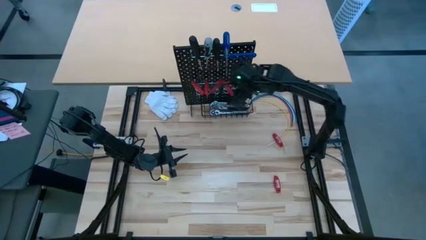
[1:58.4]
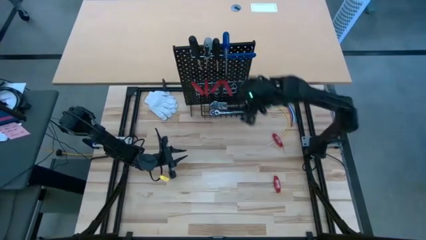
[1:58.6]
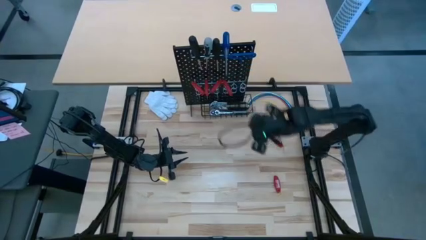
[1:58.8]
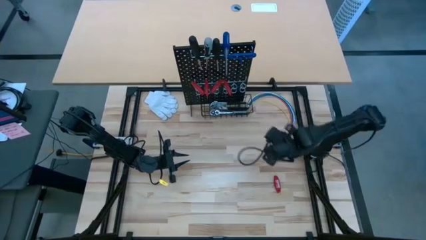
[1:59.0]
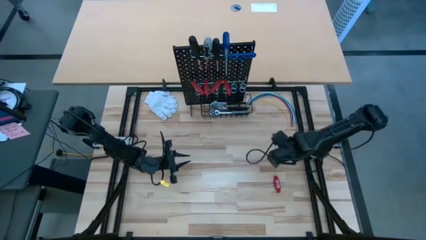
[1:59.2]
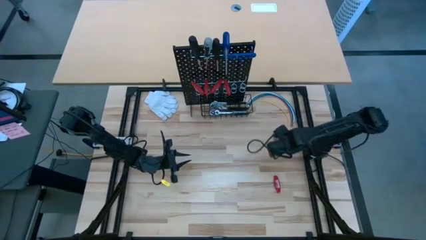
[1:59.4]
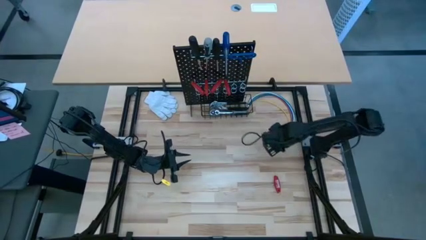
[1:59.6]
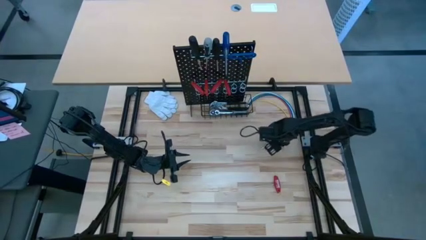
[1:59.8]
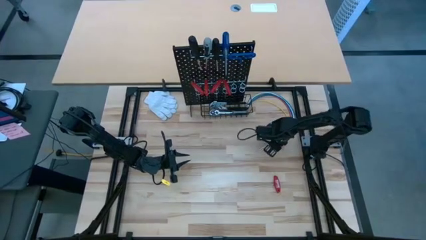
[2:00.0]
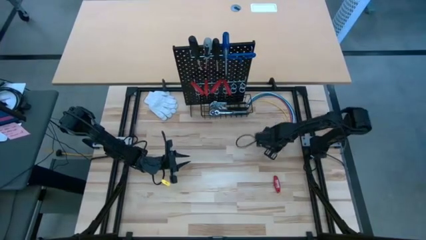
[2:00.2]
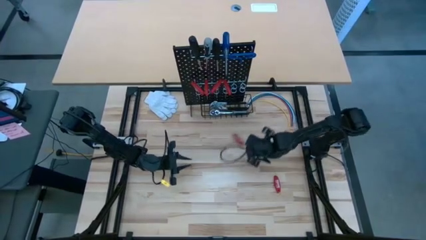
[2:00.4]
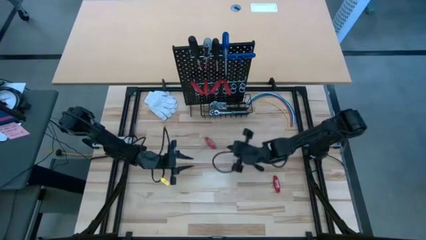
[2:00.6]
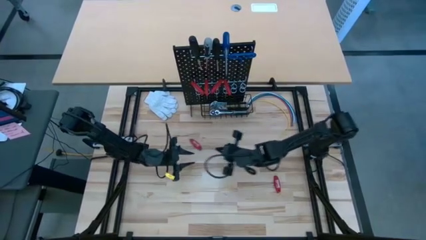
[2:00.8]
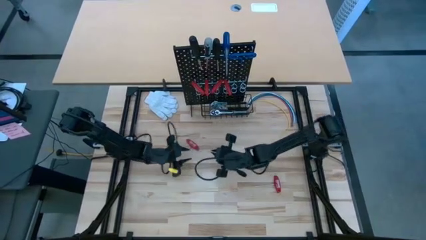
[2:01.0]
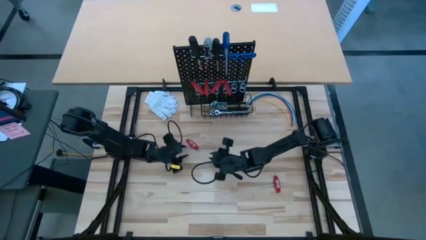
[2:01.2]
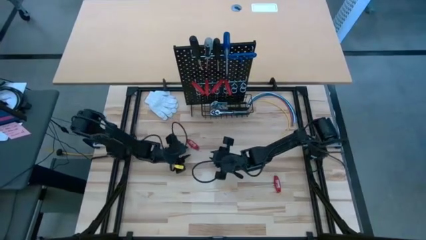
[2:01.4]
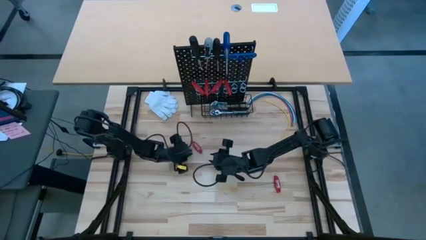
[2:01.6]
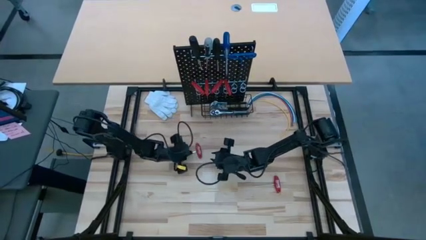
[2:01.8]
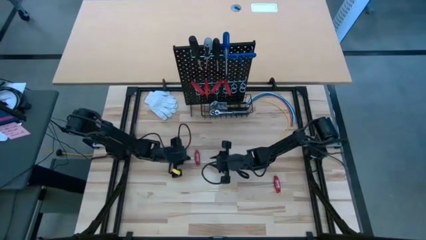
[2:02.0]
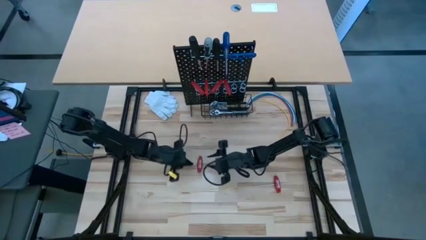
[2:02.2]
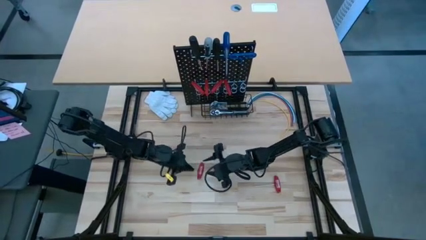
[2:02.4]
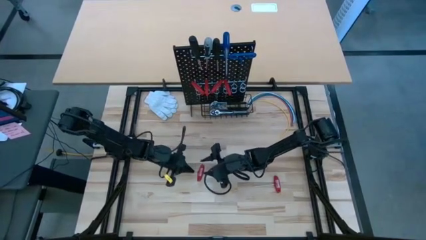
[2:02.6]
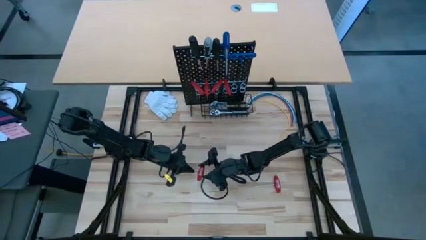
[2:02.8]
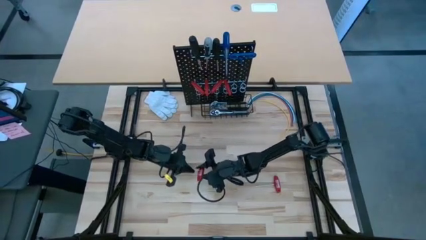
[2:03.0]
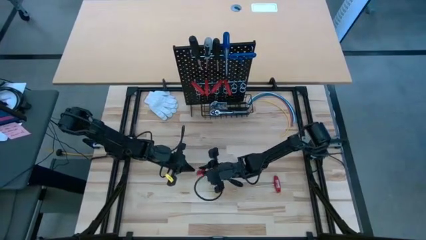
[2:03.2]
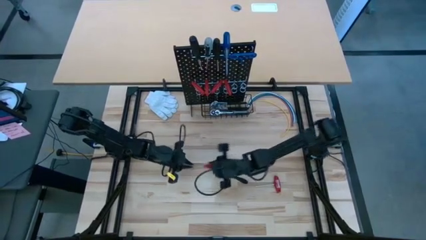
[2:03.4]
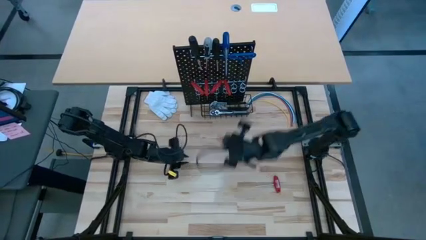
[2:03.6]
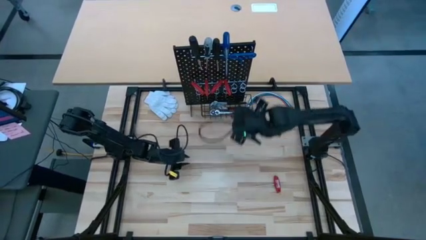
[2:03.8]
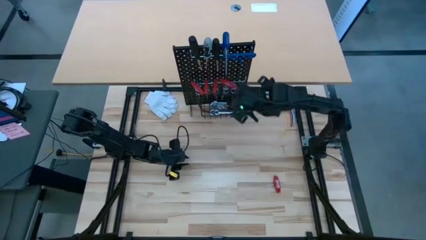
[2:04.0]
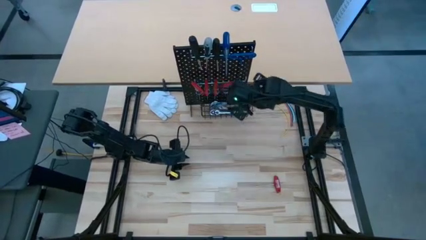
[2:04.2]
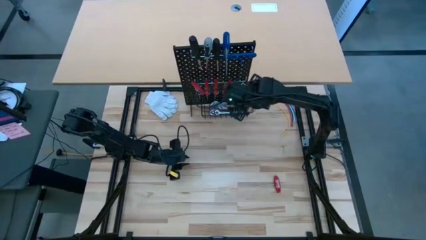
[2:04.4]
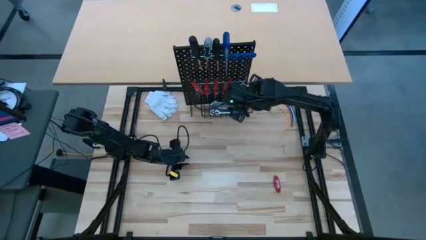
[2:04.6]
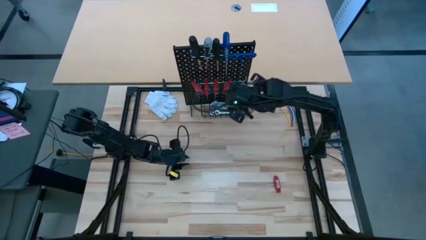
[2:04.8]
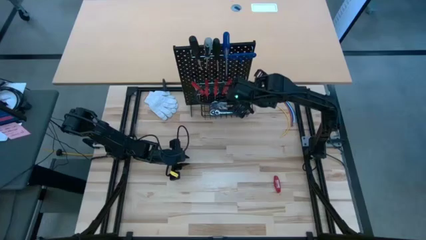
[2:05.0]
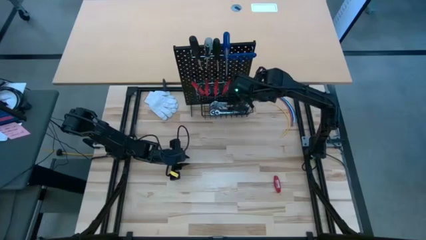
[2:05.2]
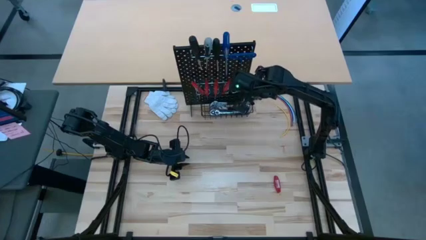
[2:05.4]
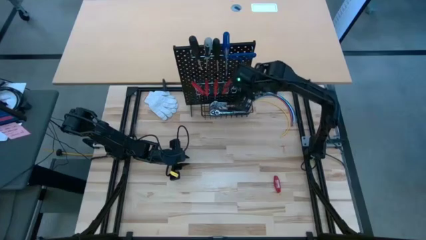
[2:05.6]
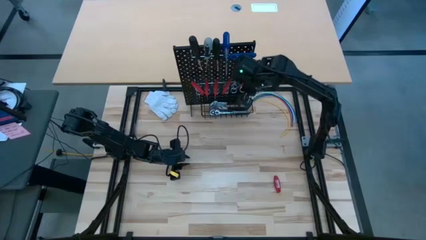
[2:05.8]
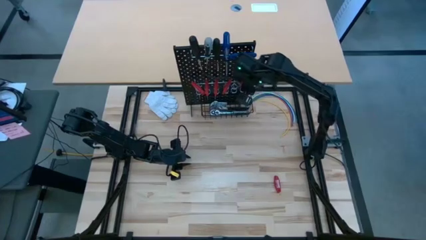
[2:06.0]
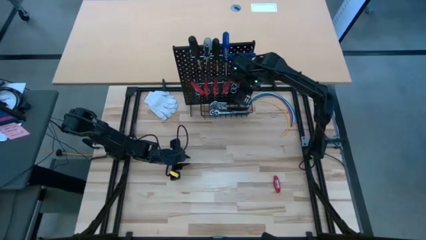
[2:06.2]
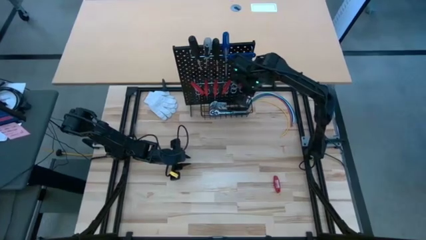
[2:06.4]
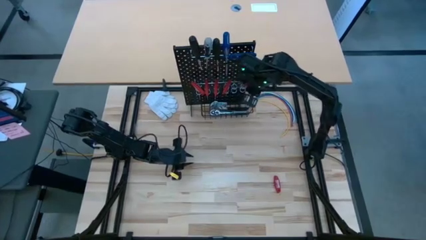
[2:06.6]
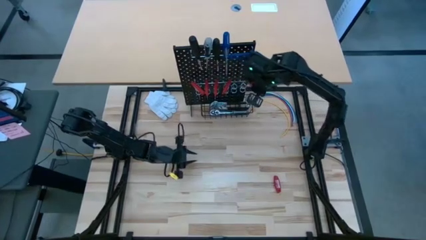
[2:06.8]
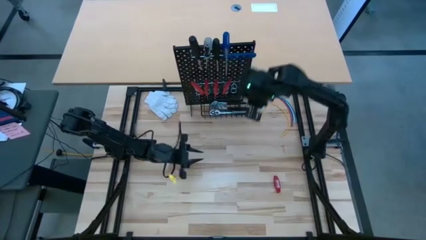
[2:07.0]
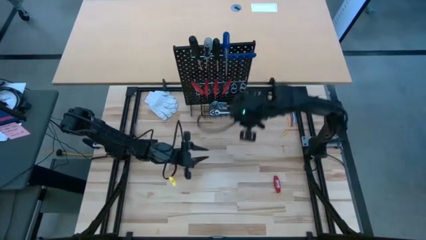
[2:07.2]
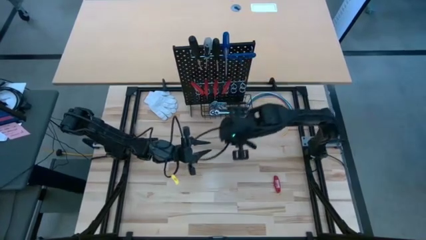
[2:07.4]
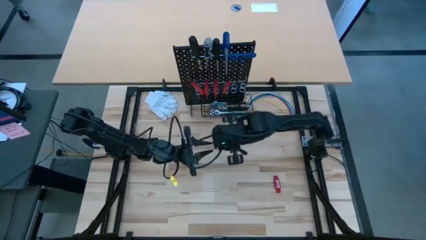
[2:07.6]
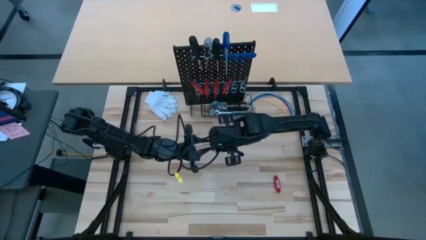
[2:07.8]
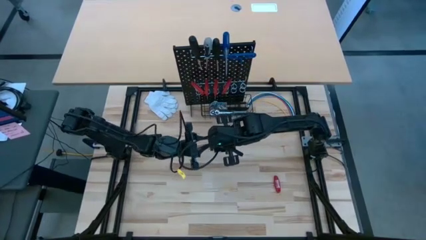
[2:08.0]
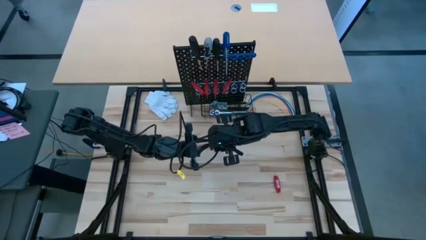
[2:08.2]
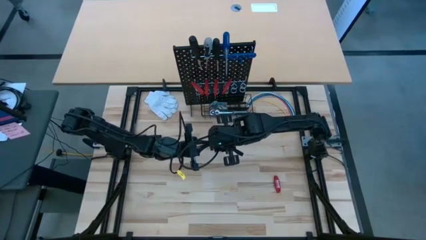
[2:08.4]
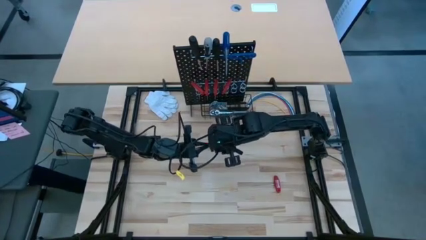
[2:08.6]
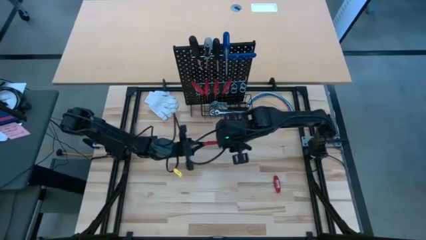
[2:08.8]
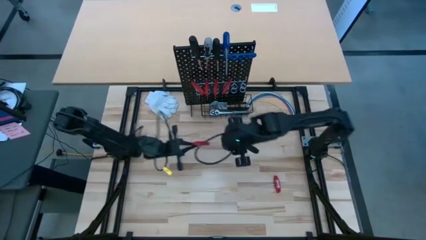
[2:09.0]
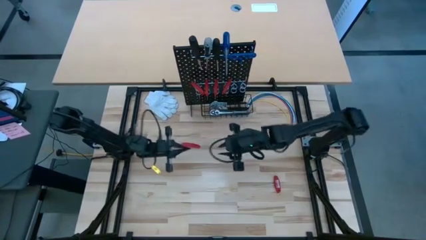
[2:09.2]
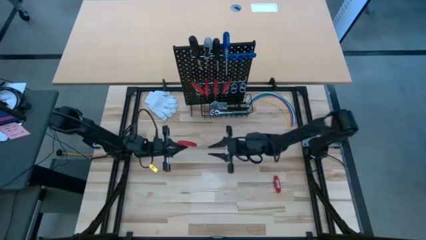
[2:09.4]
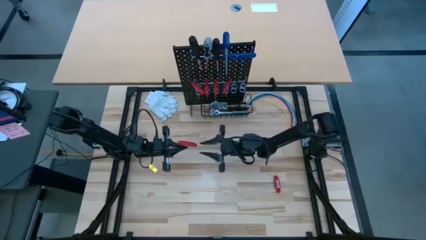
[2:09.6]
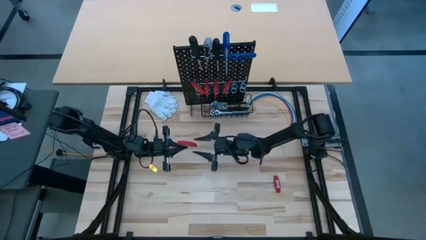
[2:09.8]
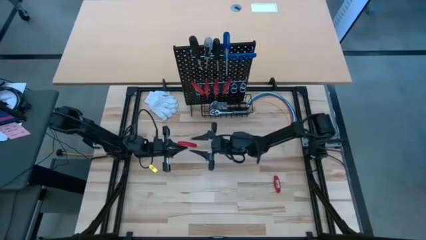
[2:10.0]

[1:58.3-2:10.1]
Task: Hang tools onto peg board
Hang the red allen wrench on the pegboard

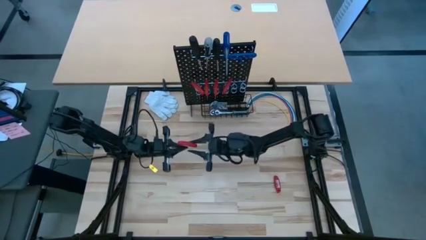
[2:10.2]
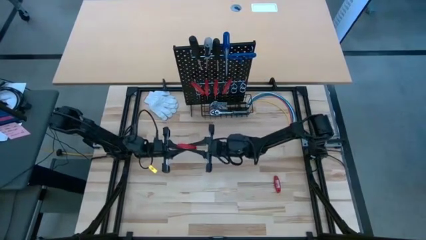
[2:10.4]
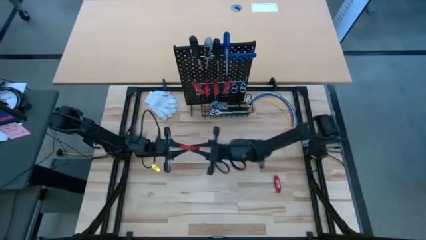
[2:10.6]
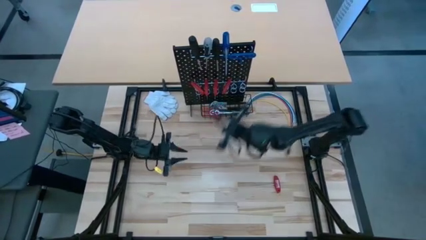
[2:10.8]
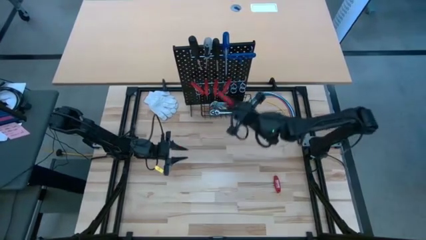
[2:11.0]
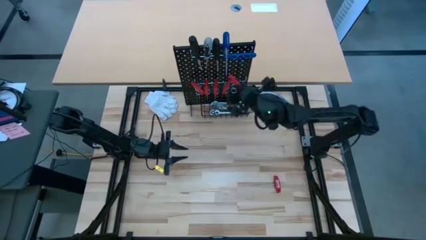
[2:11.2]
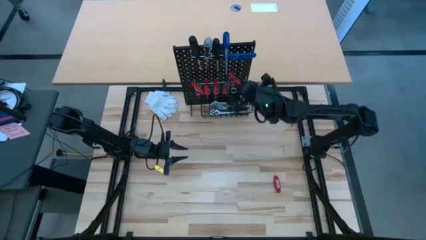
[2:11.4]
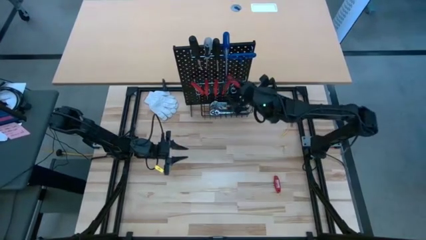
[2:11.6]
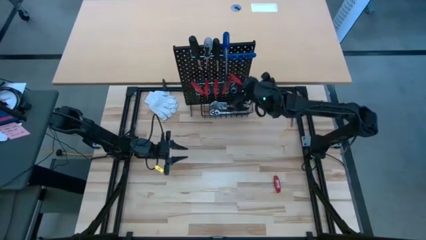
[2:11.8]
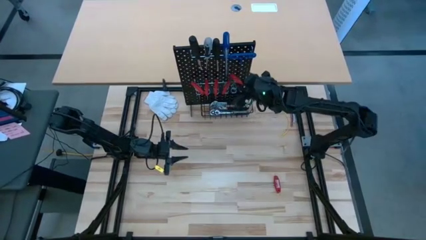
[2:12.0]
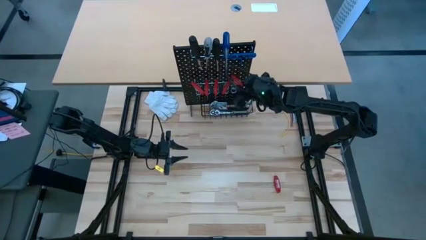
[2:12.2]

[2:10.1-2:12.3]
Hang the red allen wrench on the pegboard
